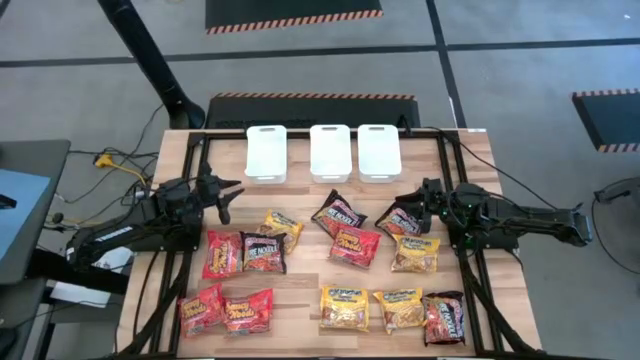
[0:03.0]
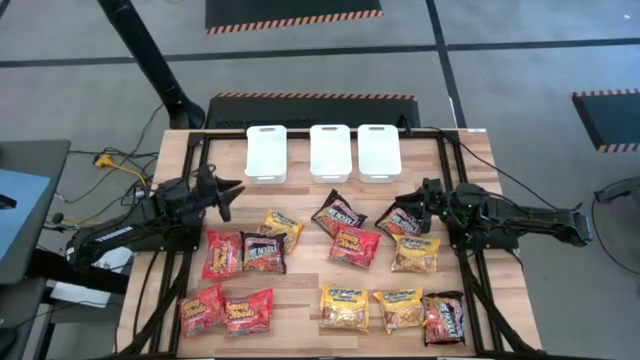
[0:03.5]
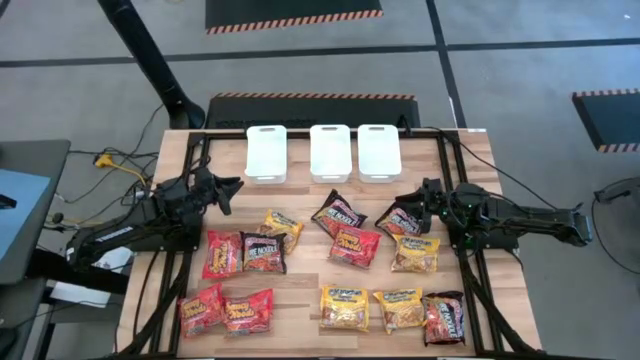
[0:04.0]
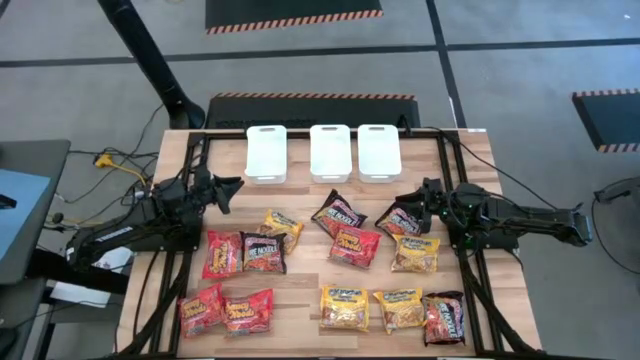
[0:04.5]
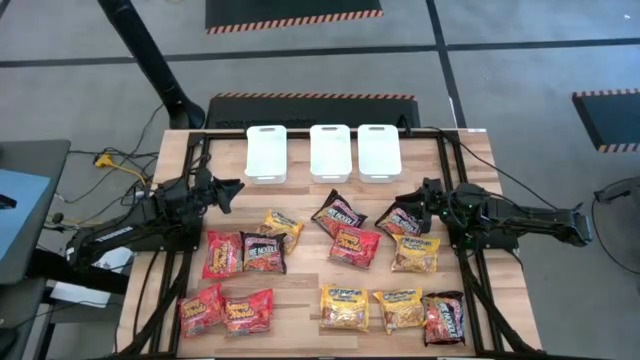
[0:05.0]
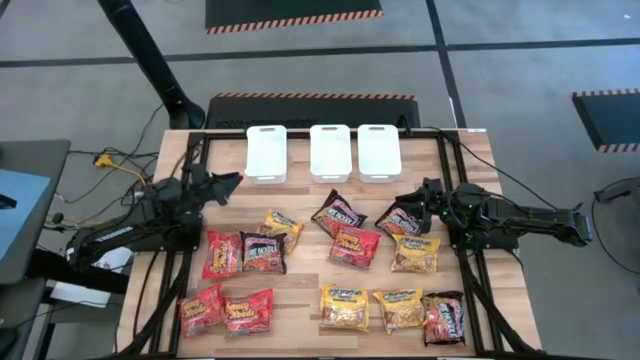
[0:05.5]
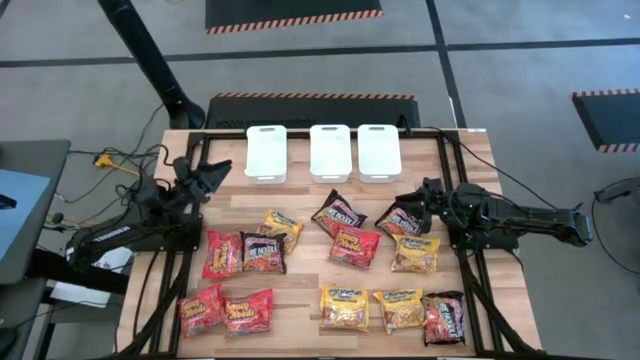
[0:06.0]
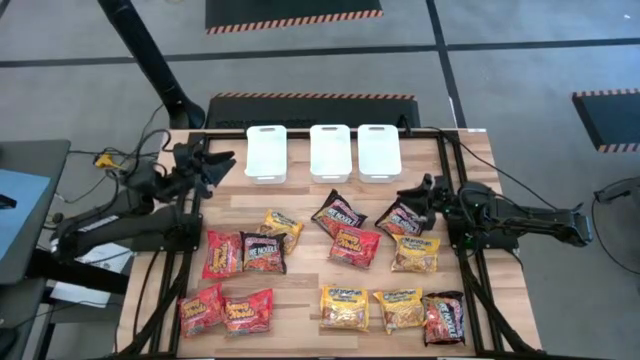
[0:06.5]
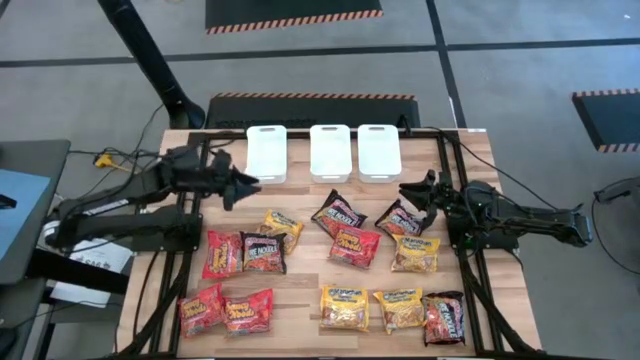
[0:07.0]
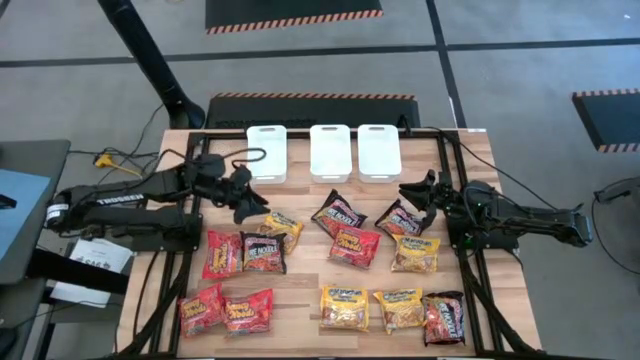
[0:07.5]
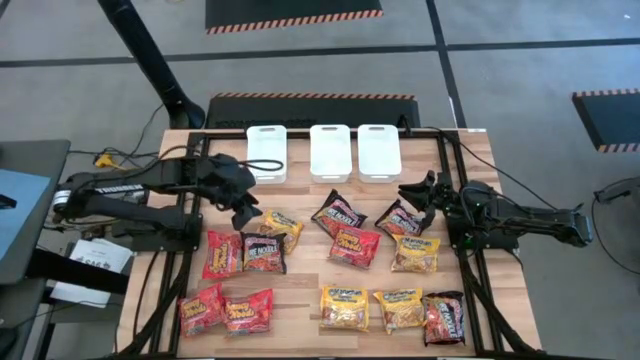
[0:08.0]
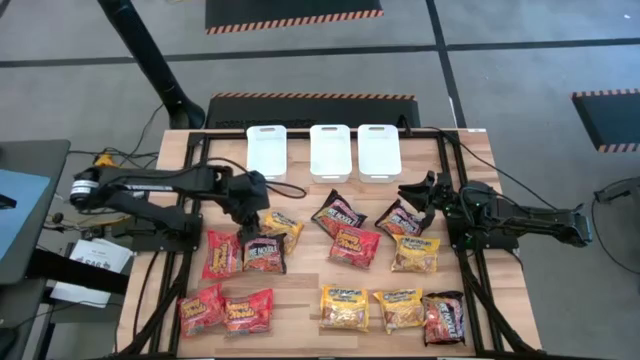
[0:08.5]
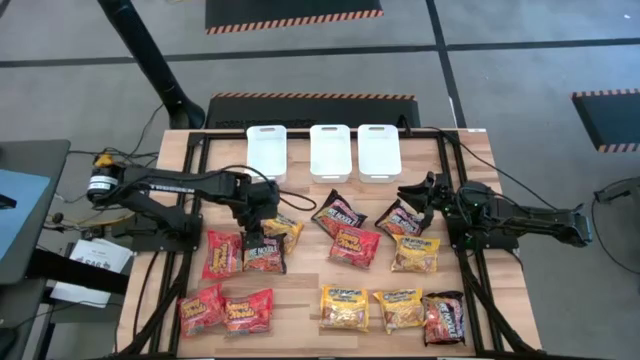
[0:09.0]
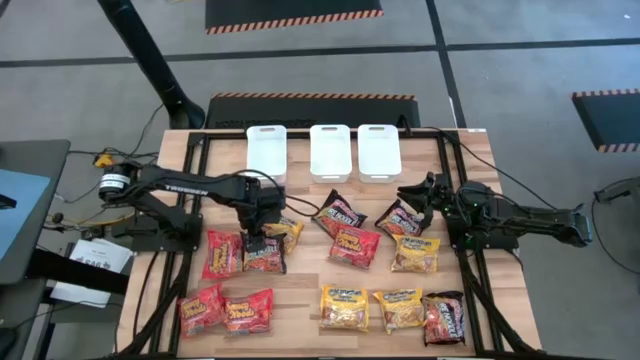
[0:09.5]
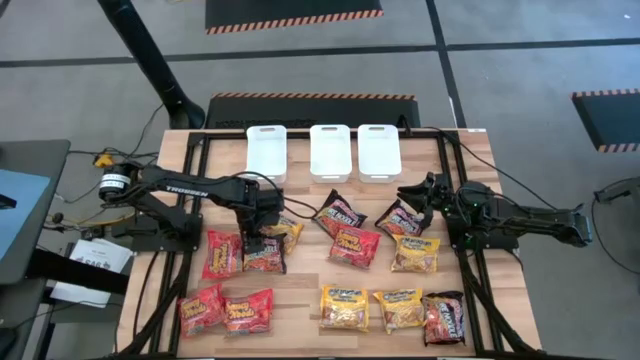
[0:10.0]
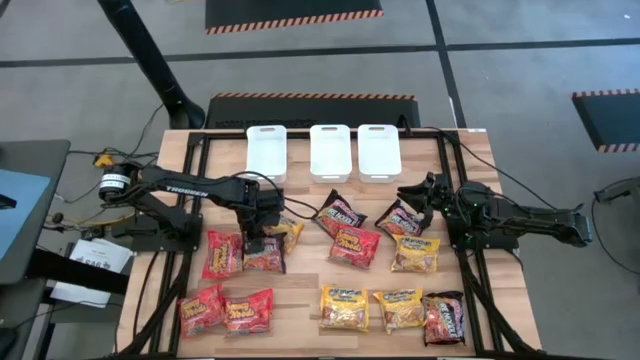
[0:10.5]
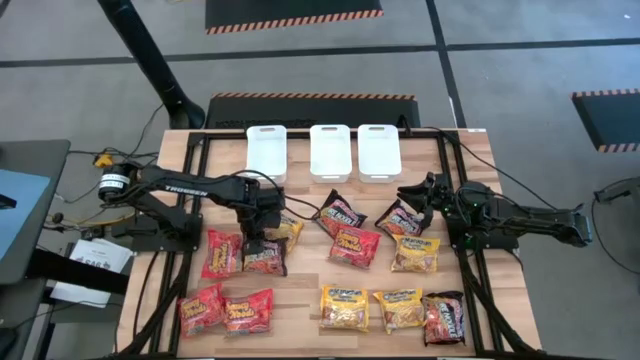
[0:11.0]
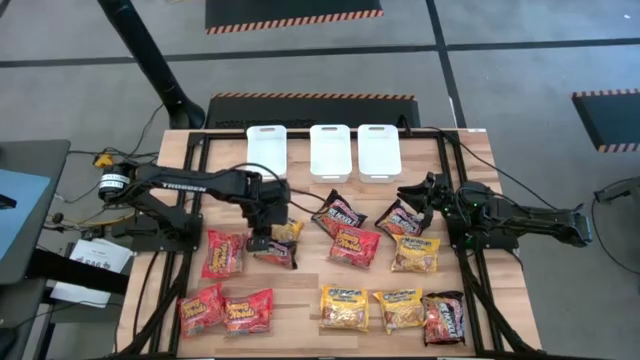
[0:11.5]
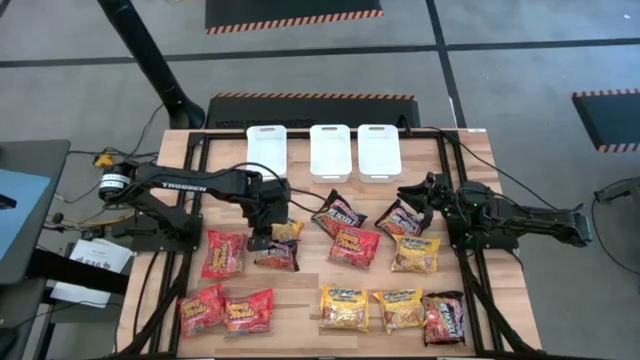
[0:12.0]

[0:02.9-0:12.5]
Task: Sort Maruchan noodles
Put the black noodle pack into the left white bin

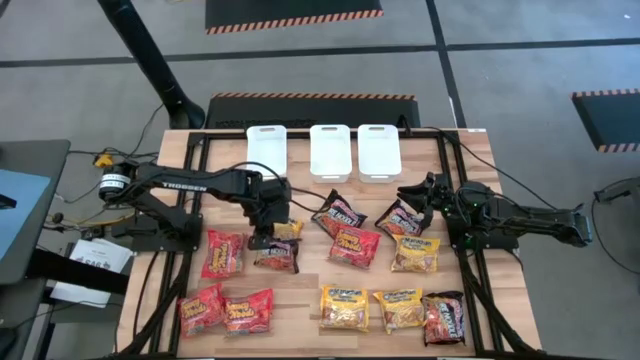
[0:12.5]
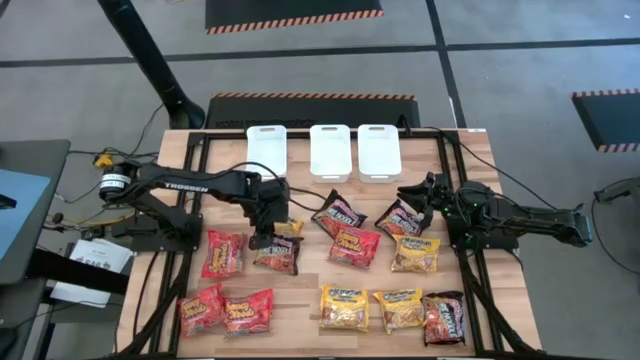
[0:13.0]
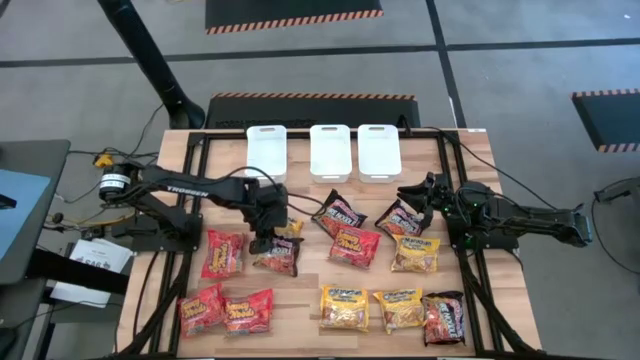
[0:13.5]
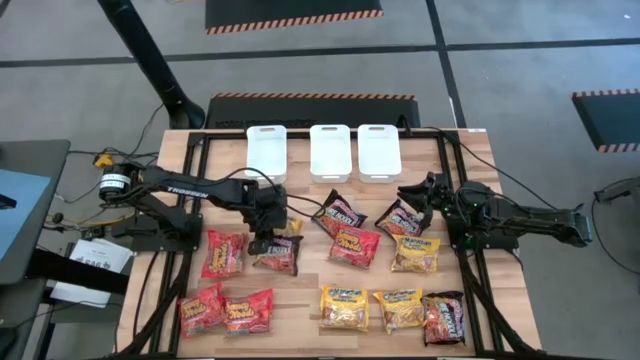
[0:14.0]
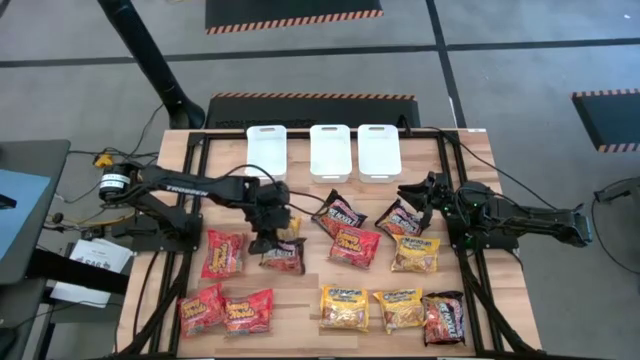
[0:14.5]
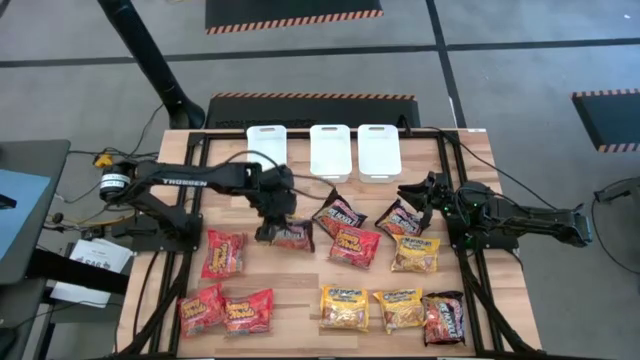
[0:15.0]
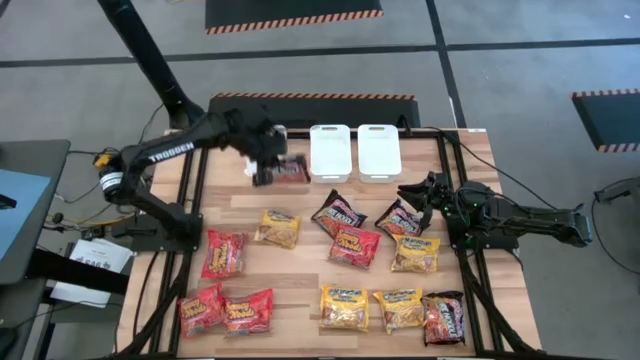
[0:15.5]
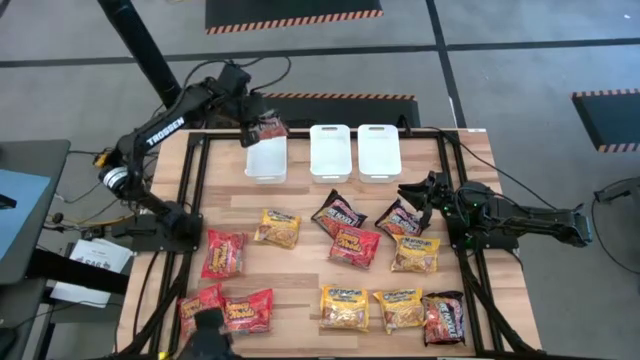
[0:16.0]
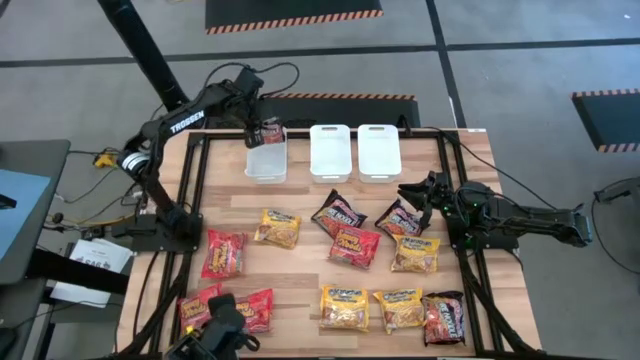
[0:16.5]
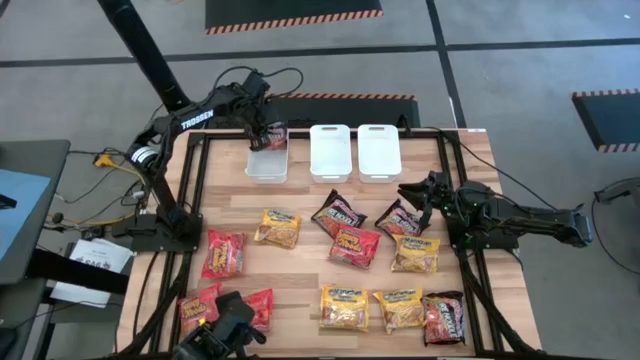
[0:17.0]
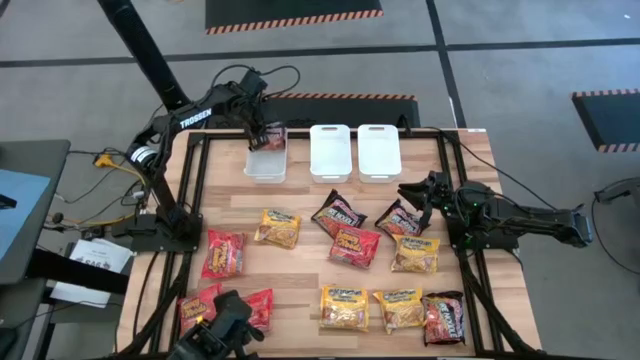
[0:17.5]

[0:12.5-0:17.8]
Put the black noodle pack into the left white bin

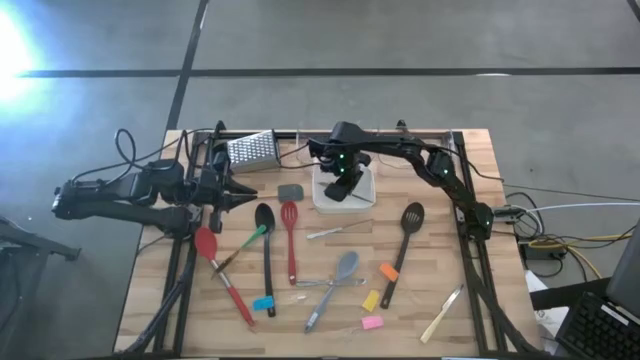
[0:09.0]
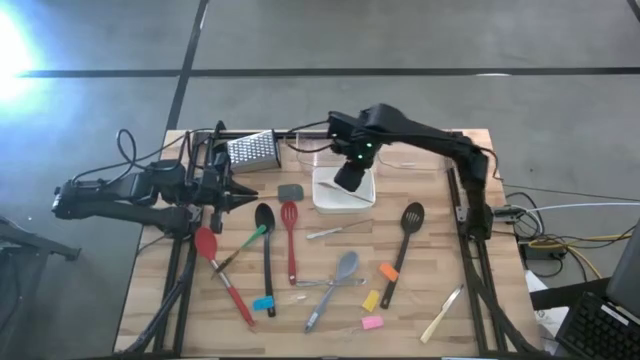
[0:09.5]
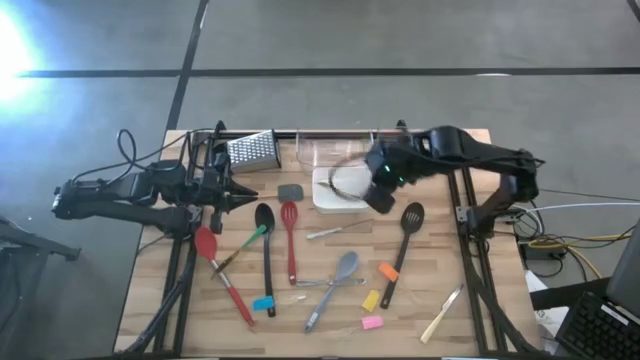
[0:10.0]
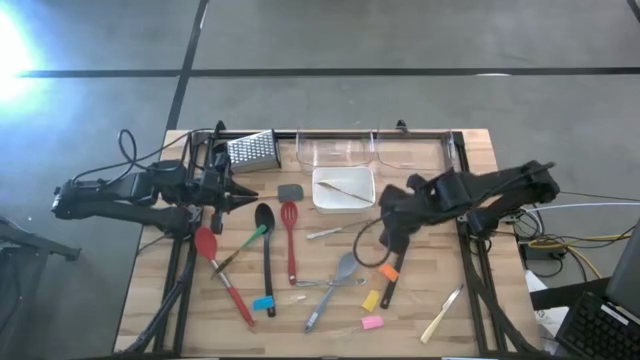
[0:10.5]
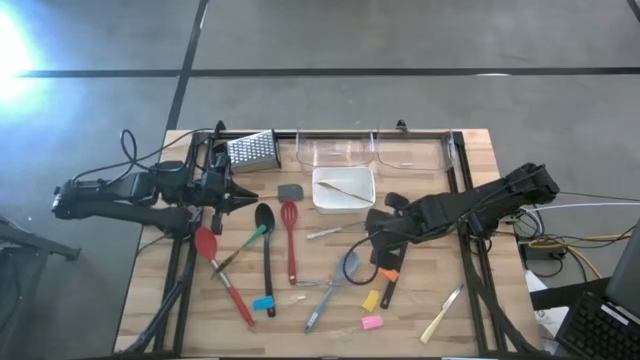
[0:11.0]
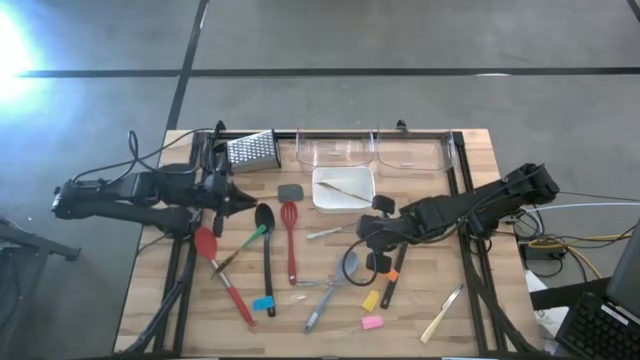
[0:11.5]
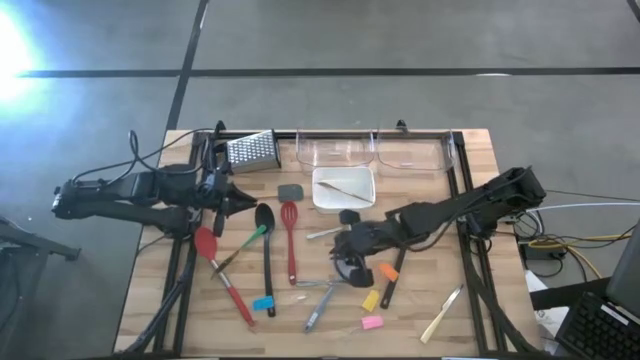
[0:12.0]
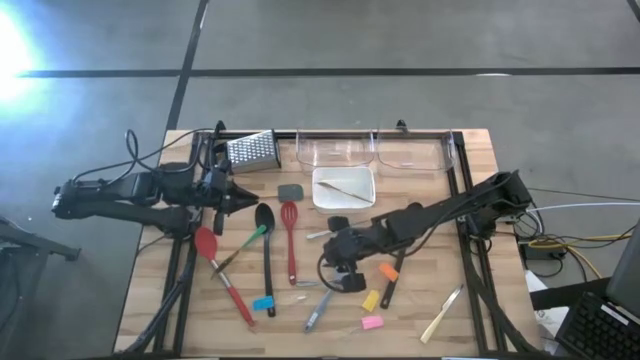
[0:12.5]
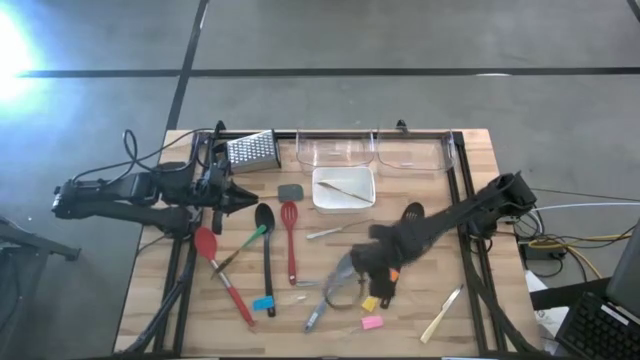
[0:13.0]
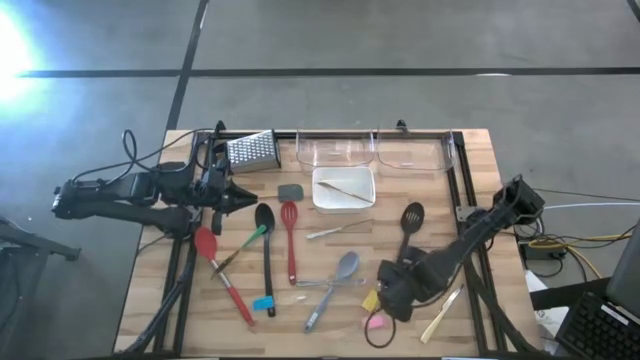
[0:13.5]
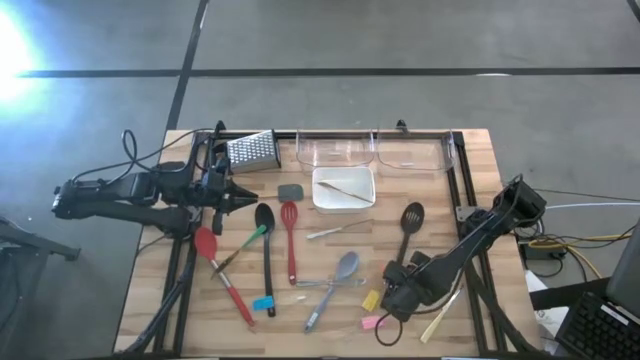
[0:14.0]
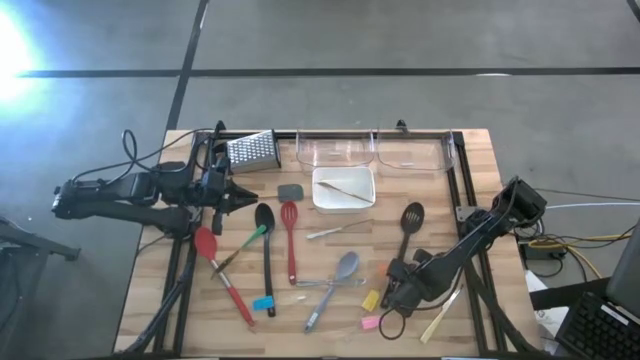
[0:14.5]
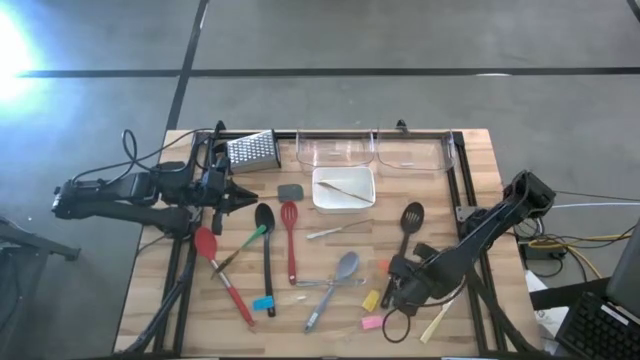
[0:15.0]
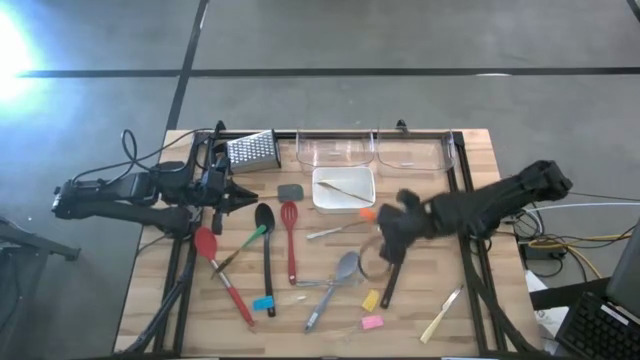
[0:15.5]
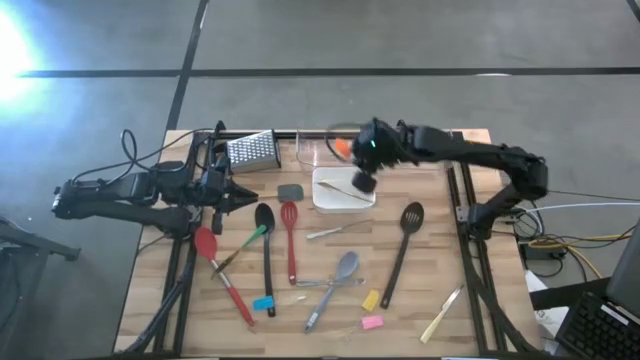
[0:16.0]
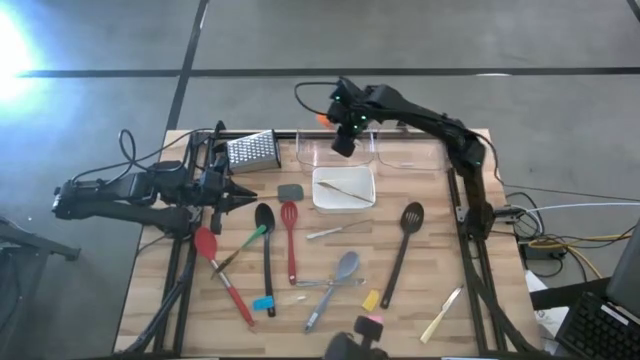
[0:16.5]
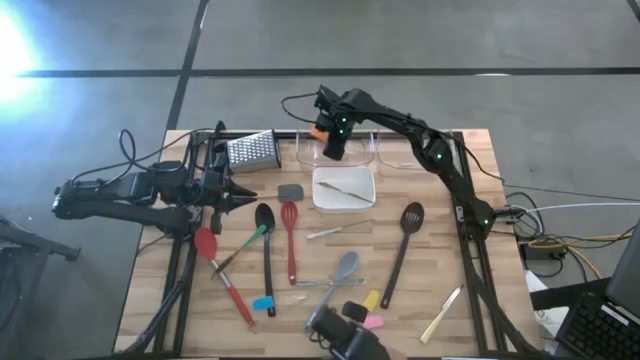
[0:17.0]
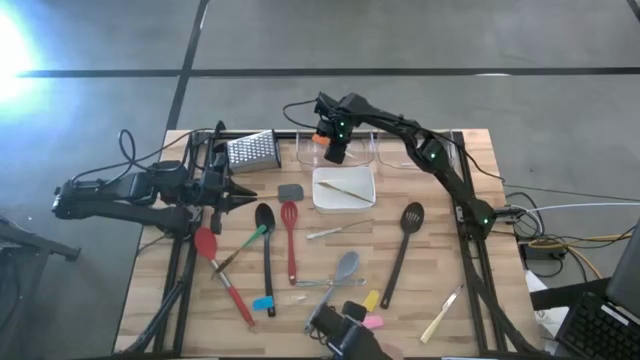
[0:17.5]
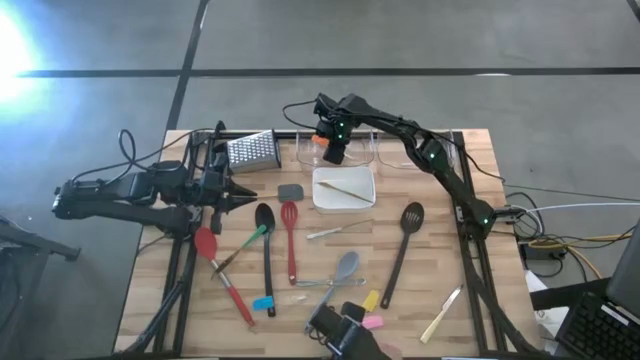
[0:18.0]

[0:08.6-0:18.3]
Task: Pick & Place Kitchen Items
Put the orange spatula into the transparent bin
